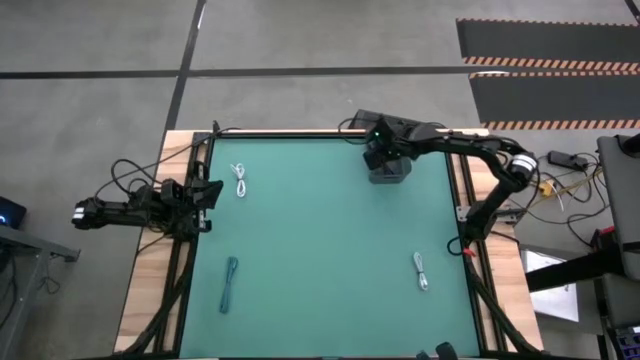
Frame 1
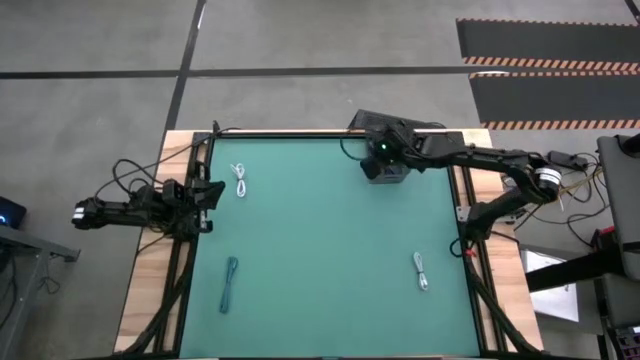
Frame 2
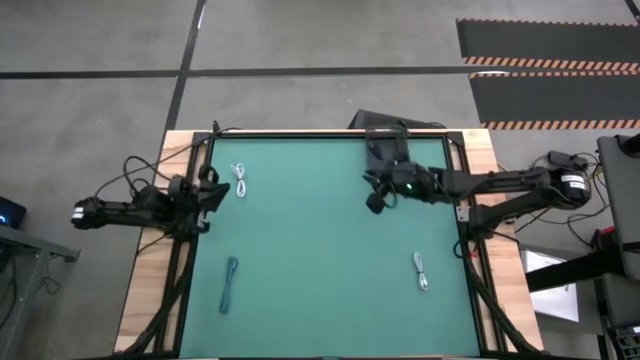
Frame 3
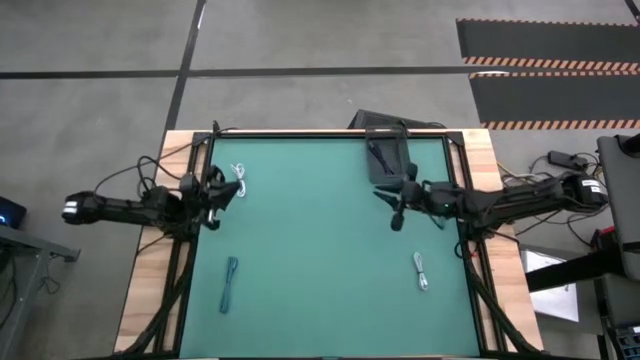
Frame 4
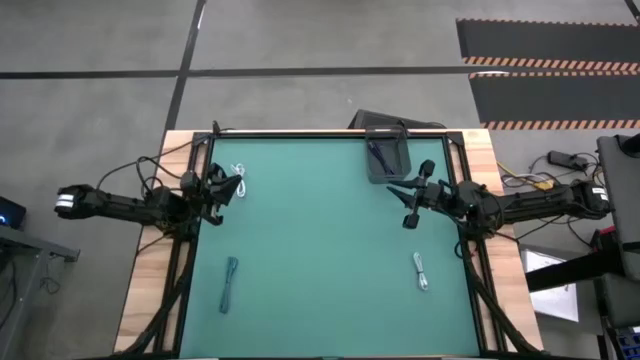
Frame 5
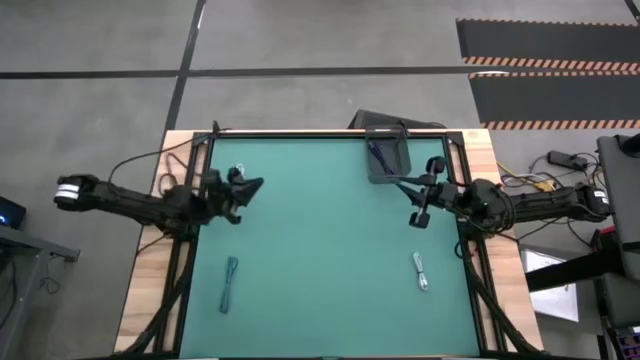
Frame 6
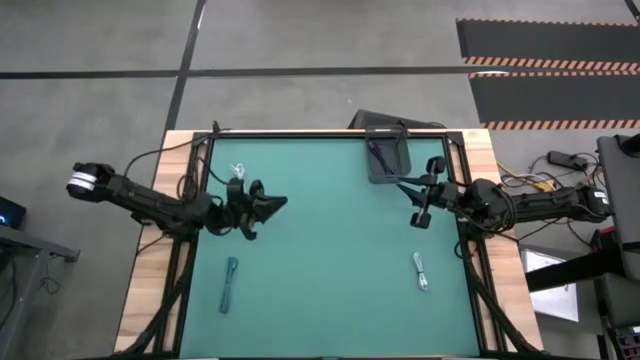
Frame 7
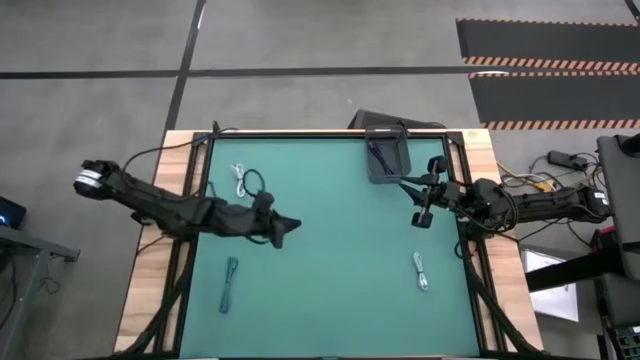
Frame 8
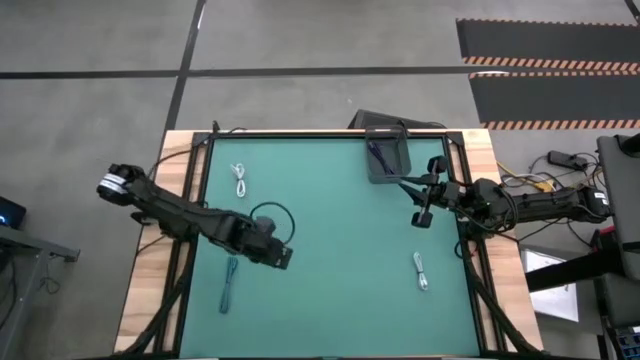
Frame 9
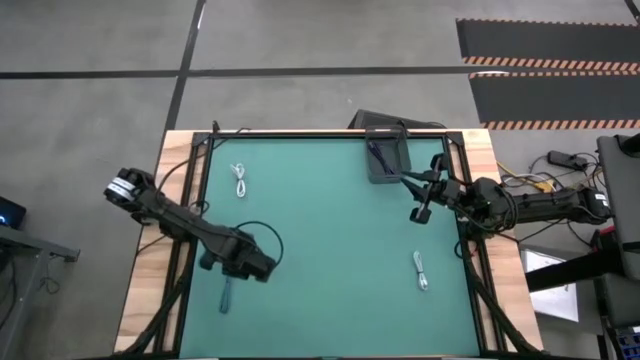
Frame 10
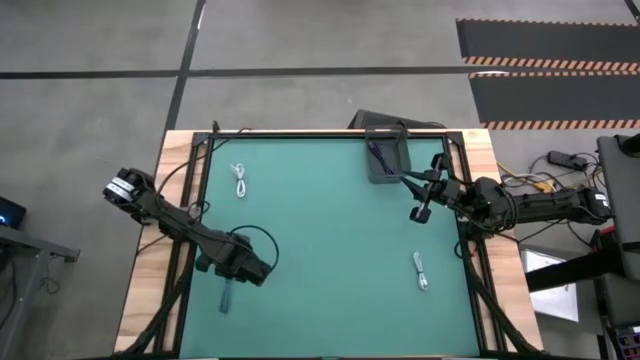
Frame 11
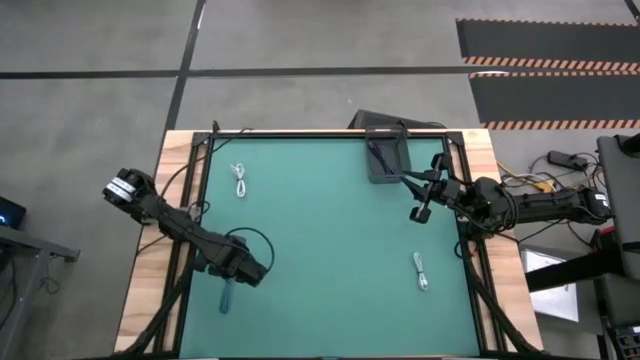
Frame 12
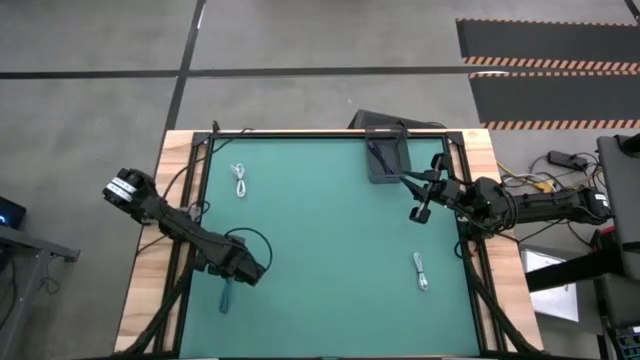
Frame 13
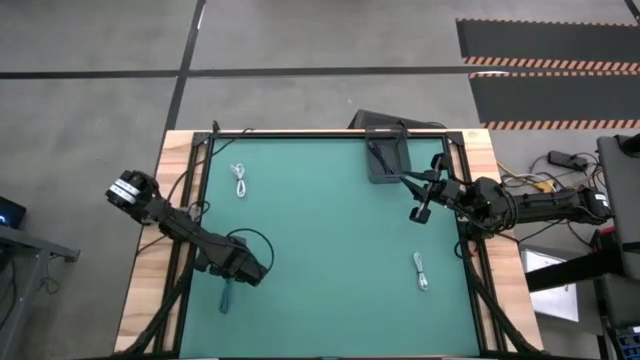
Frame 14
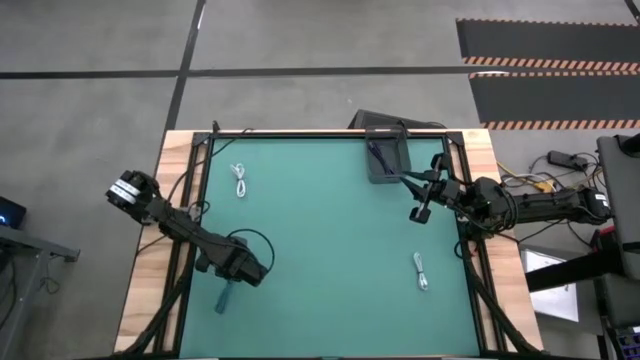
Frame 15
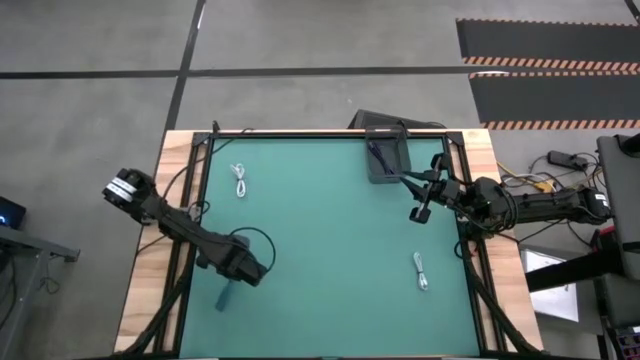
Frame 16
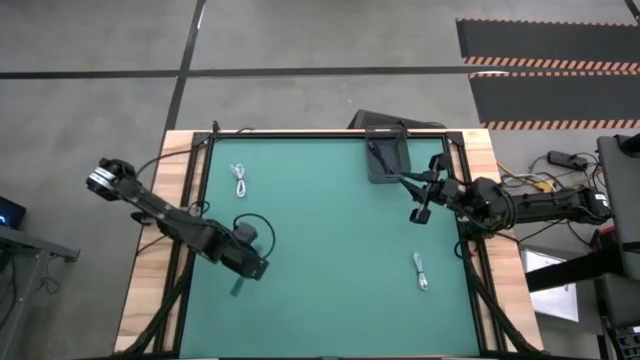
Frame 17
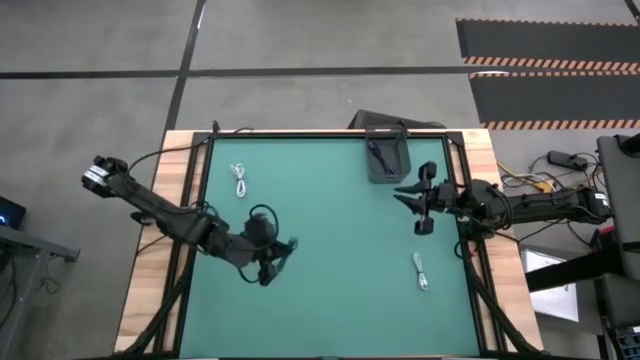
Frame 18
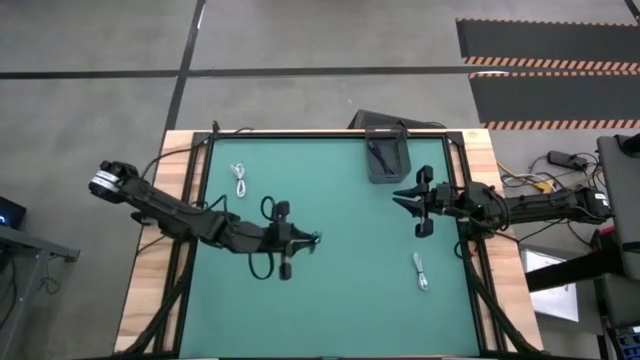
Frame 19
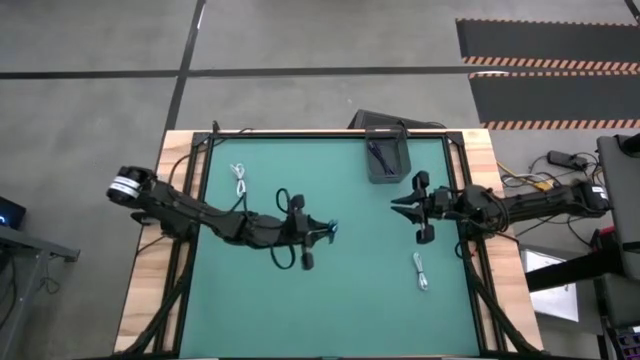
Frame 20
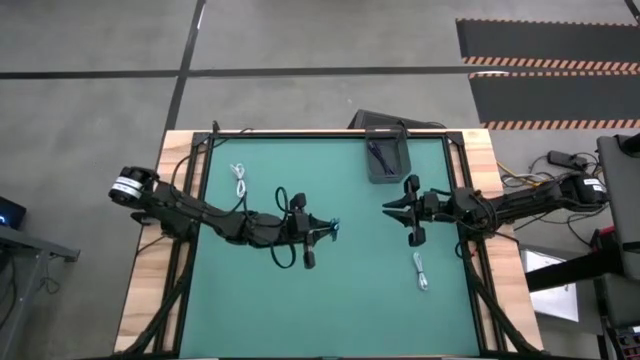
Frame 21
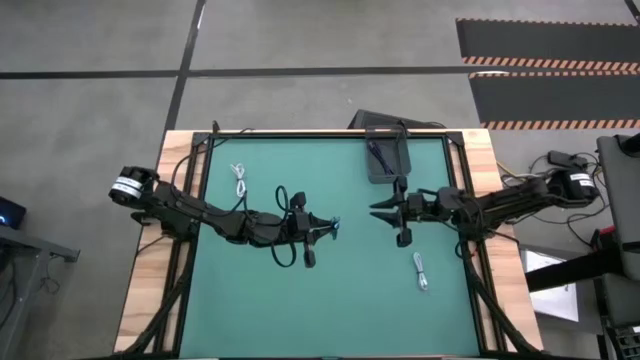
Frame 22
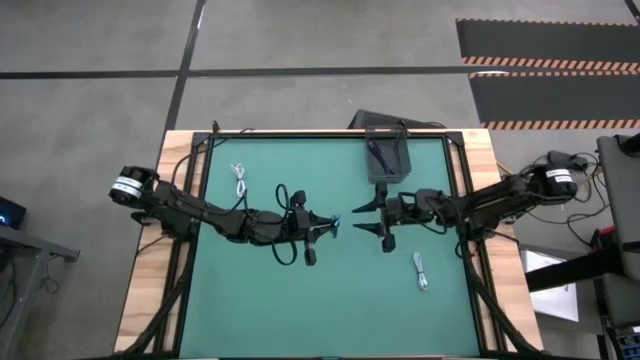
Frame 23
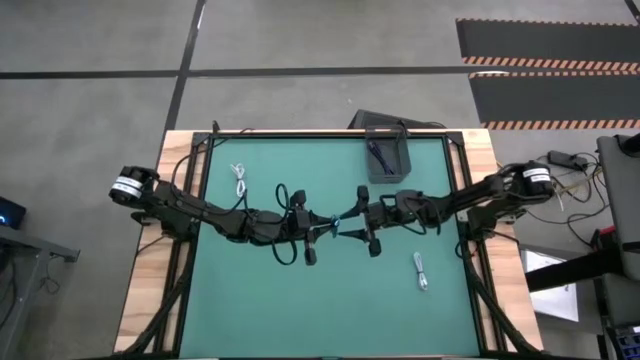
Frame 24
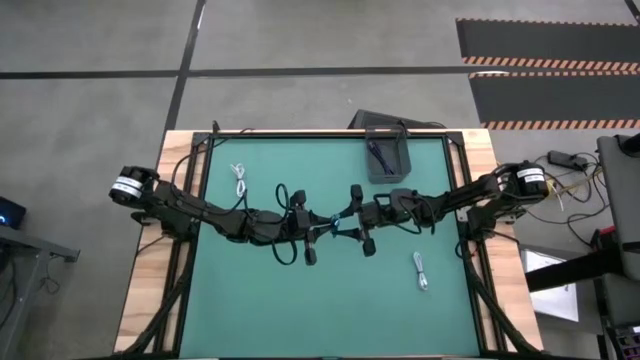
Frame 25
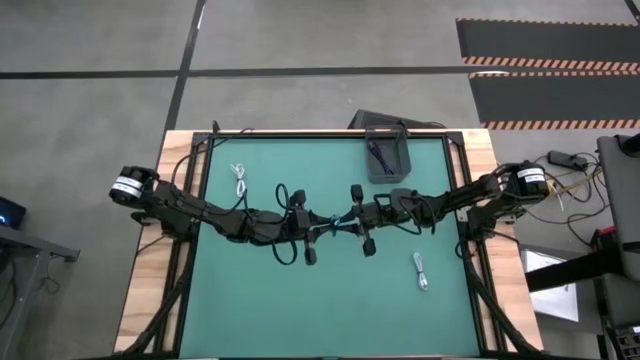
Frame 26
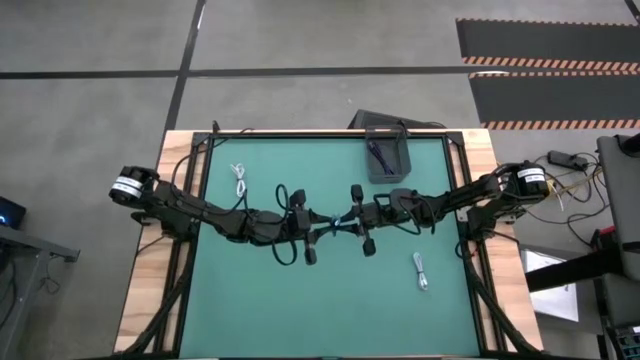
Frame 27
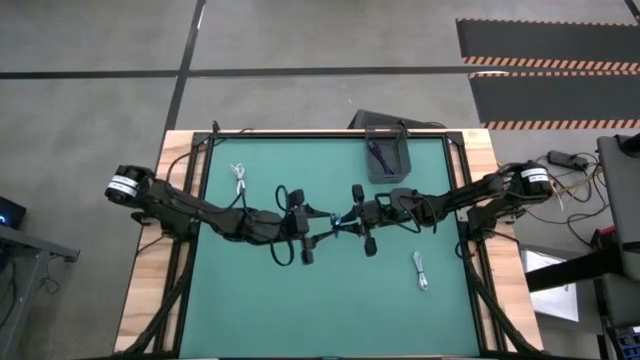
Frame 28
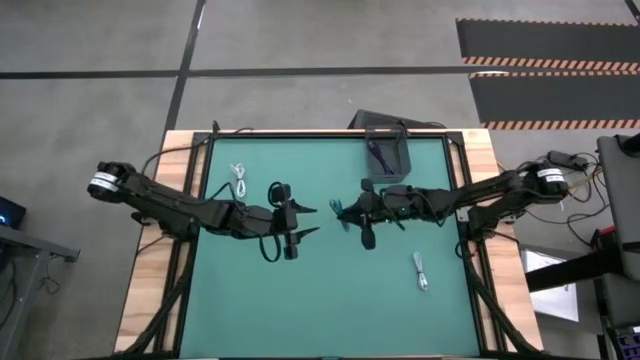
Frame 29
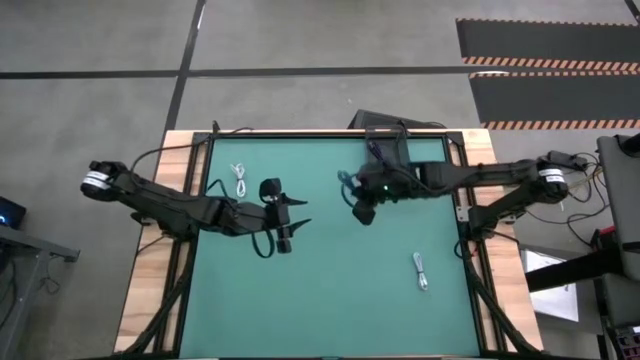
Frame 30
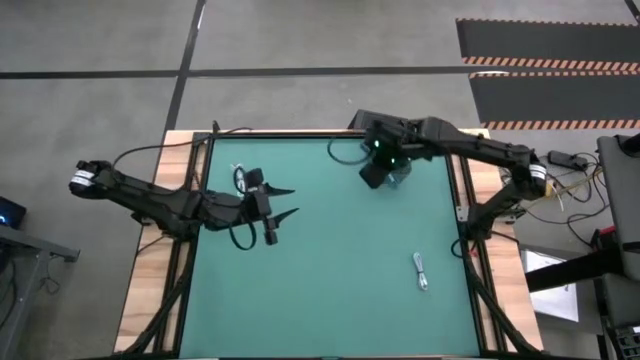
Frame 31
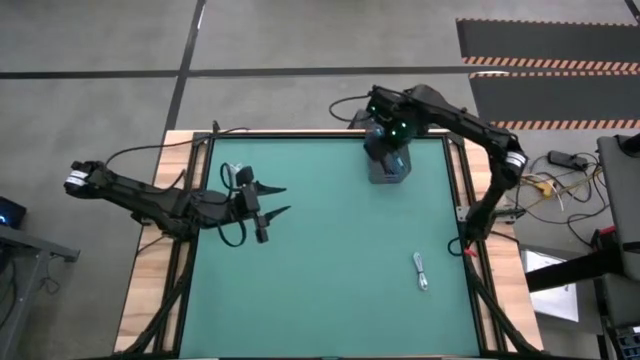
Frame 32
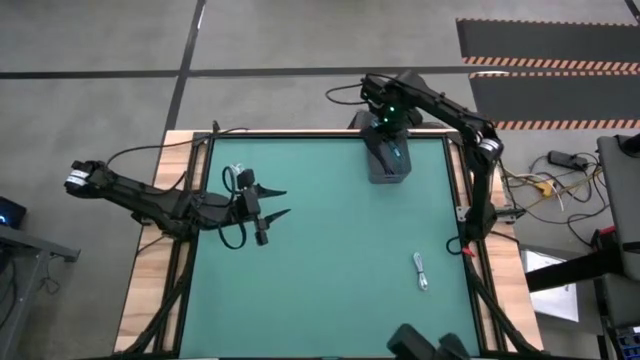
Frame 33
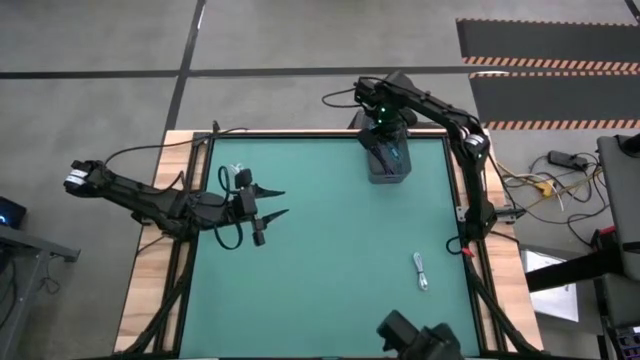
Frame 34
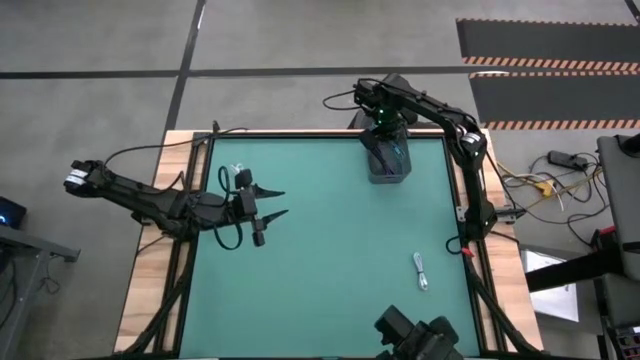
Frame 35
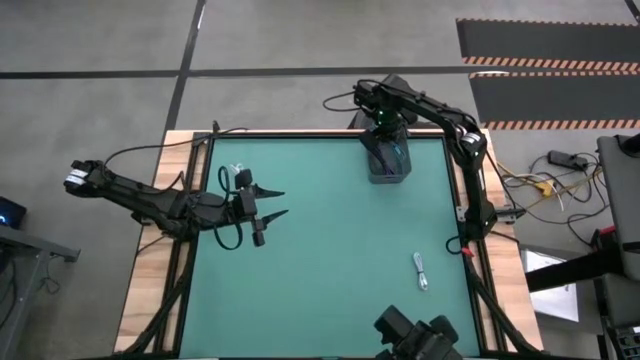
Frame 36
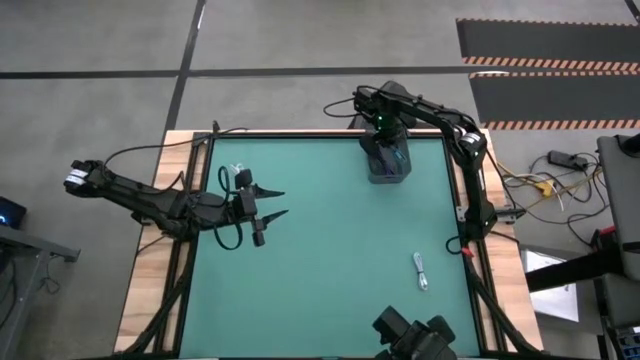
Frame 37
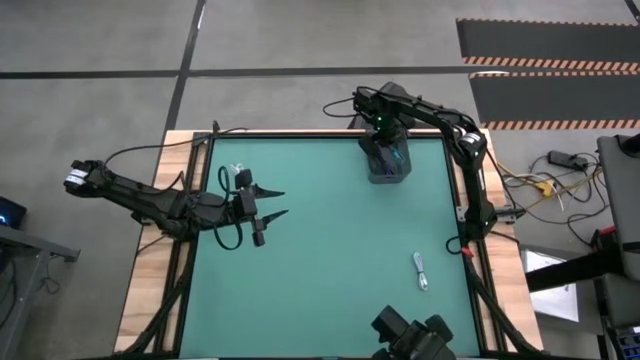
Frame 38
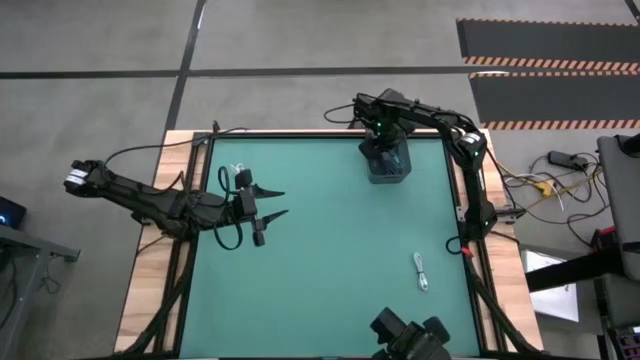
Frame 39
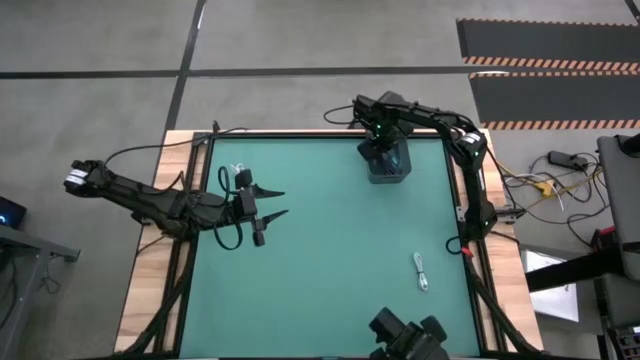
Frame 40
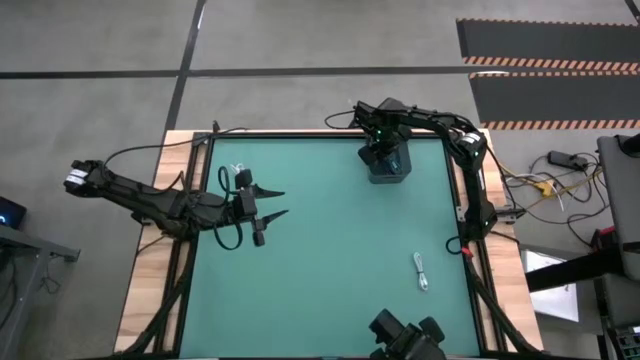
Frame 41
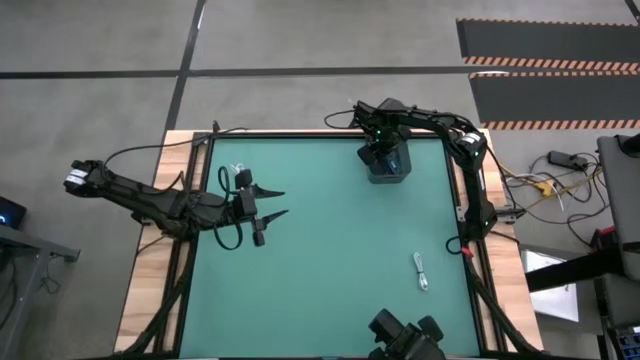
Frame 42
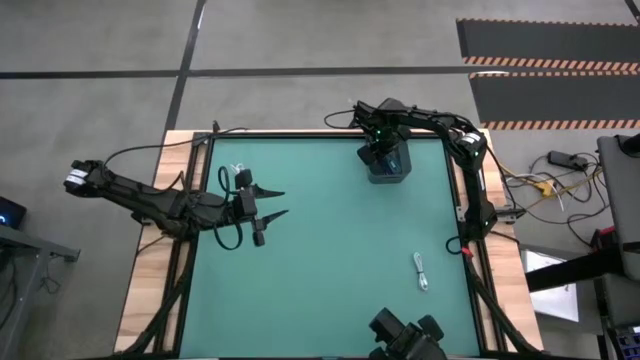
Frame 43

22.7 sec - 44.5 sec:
Task: Pick and place USB-C Cables
Put the blue charger cable into the black bin
